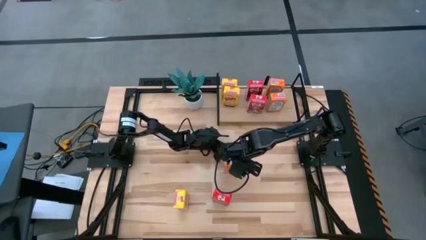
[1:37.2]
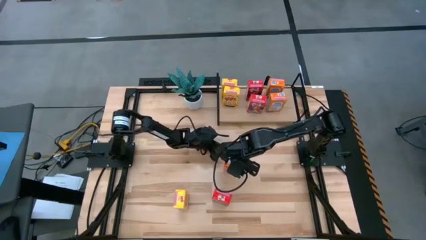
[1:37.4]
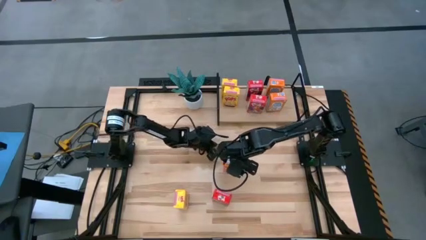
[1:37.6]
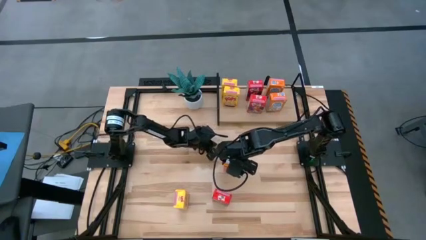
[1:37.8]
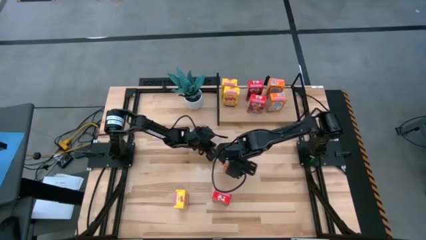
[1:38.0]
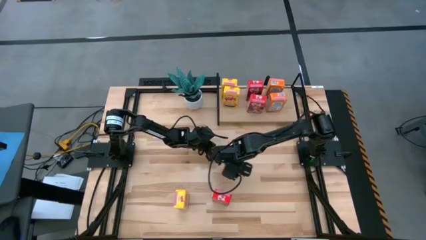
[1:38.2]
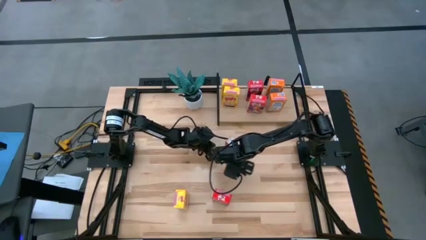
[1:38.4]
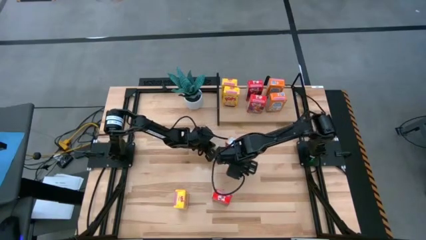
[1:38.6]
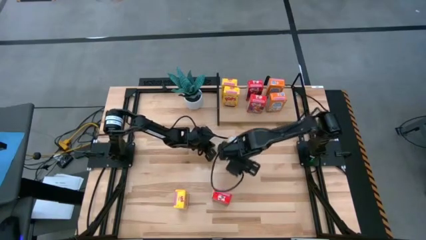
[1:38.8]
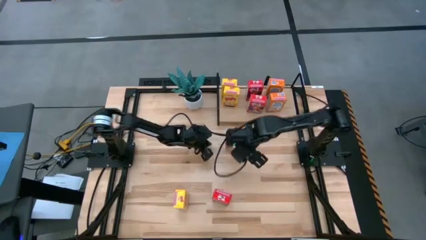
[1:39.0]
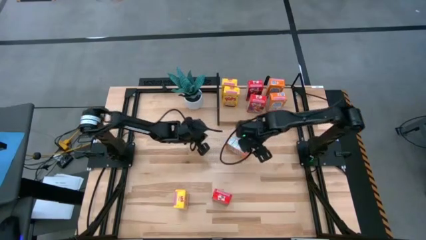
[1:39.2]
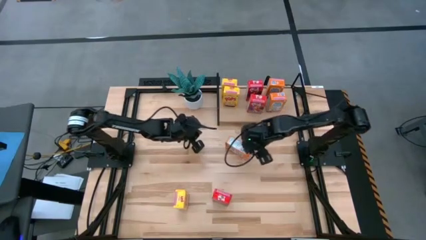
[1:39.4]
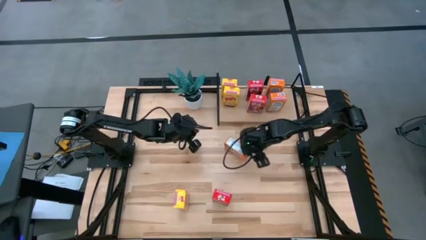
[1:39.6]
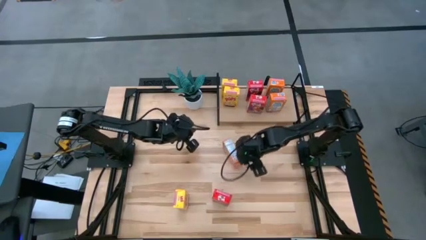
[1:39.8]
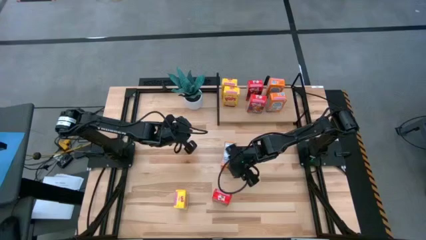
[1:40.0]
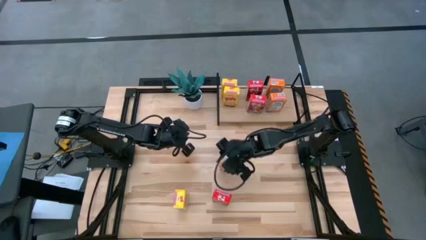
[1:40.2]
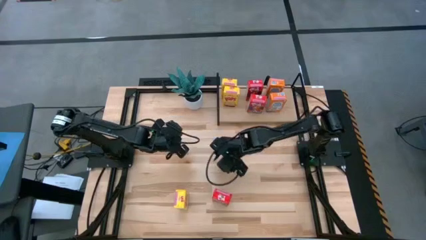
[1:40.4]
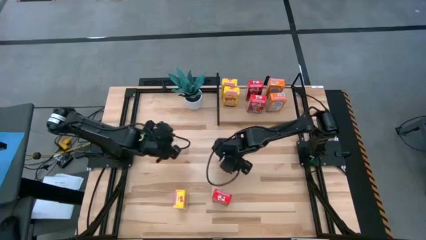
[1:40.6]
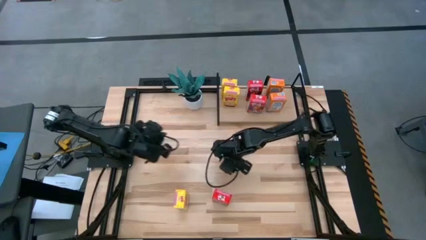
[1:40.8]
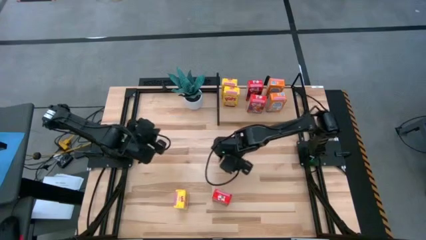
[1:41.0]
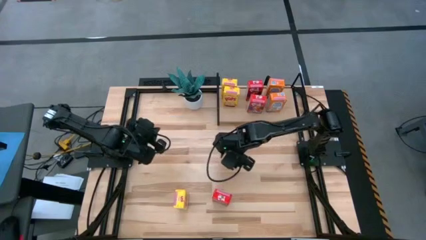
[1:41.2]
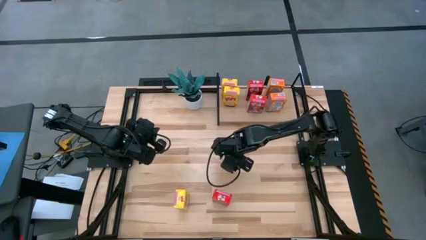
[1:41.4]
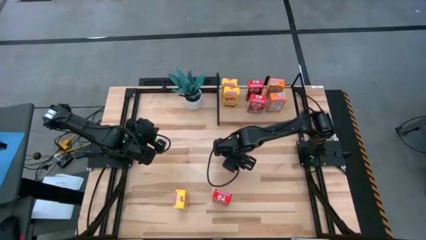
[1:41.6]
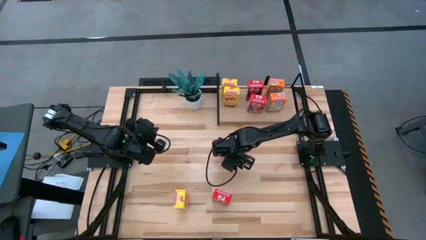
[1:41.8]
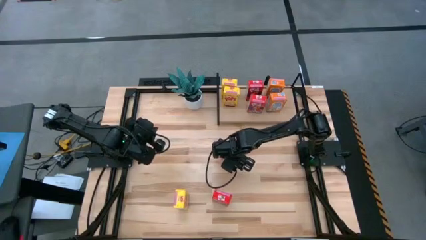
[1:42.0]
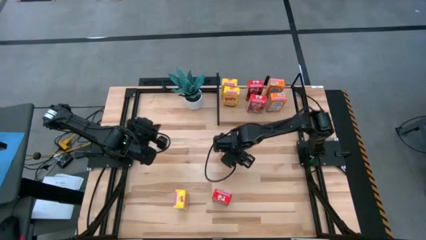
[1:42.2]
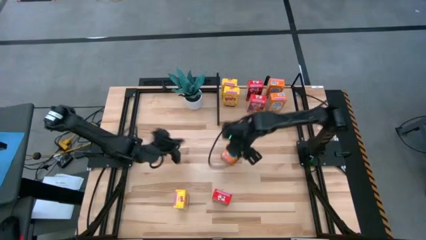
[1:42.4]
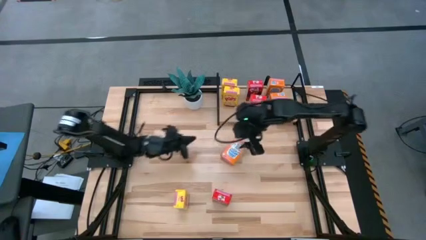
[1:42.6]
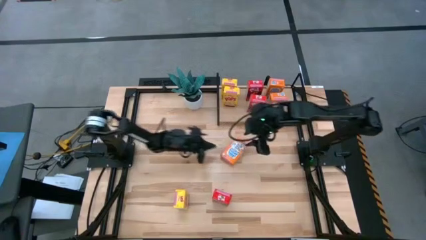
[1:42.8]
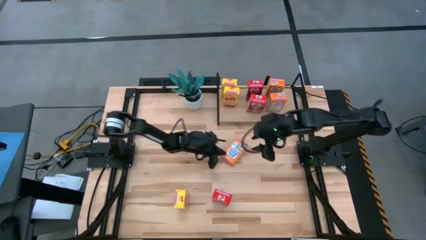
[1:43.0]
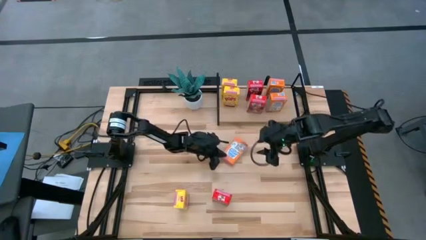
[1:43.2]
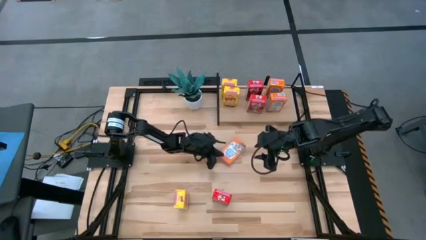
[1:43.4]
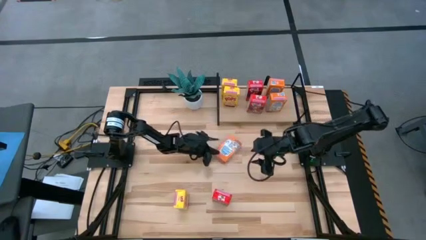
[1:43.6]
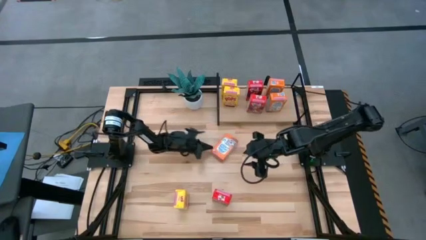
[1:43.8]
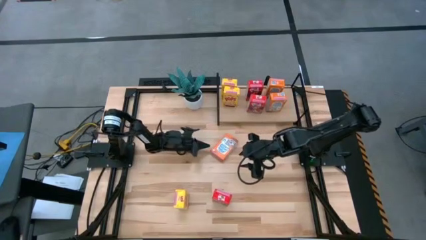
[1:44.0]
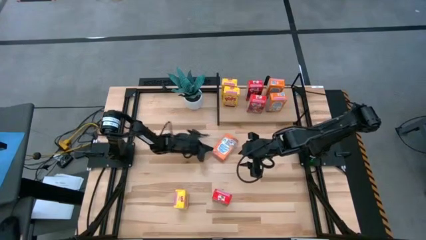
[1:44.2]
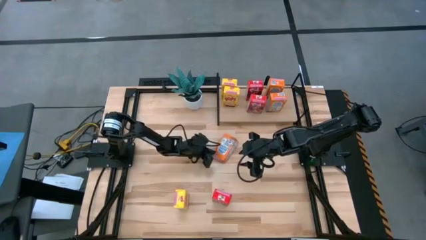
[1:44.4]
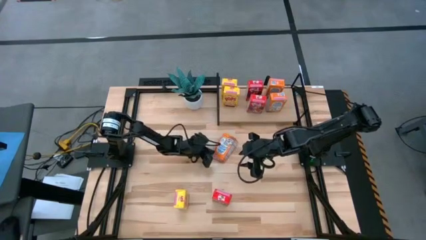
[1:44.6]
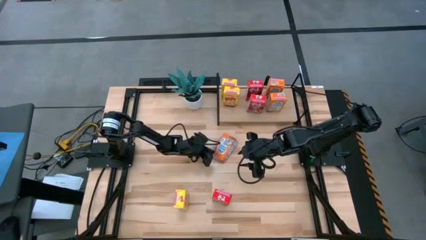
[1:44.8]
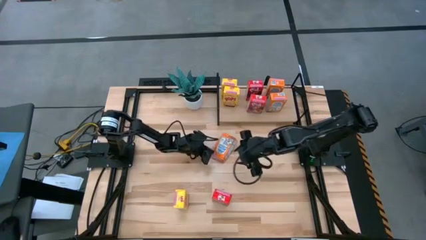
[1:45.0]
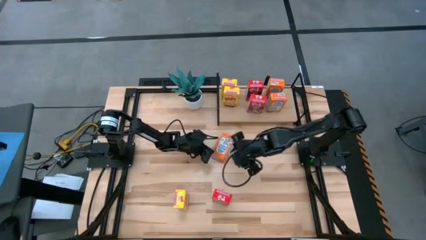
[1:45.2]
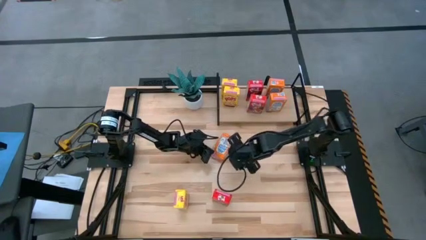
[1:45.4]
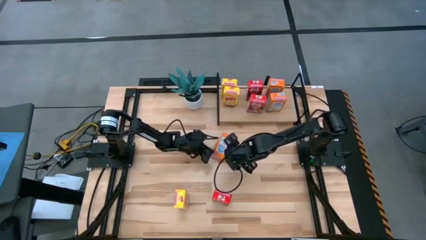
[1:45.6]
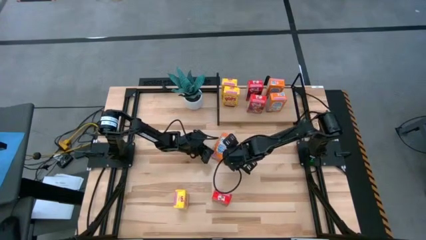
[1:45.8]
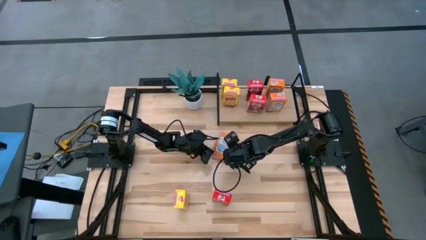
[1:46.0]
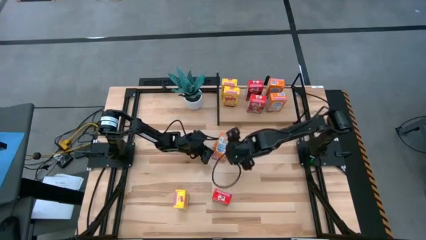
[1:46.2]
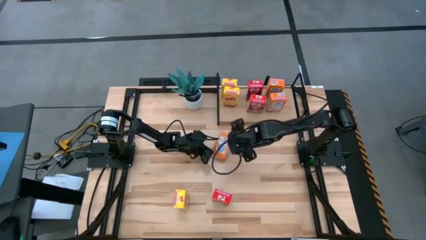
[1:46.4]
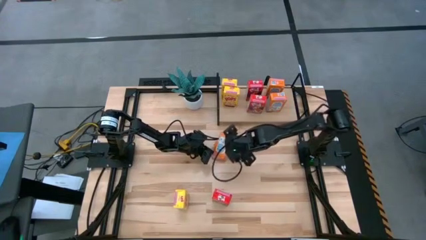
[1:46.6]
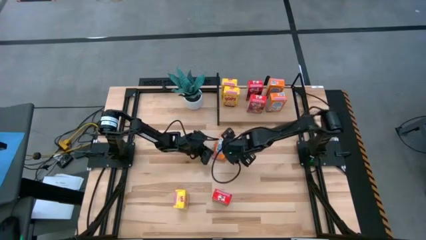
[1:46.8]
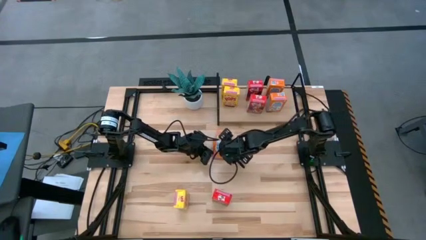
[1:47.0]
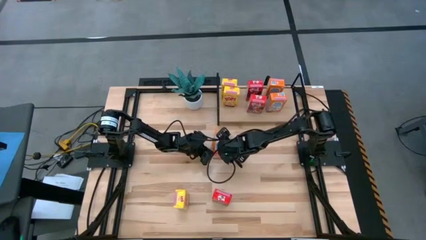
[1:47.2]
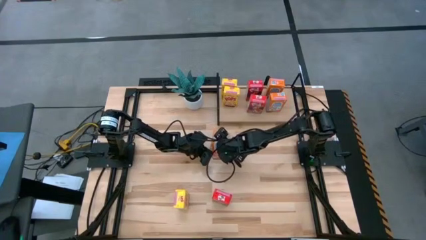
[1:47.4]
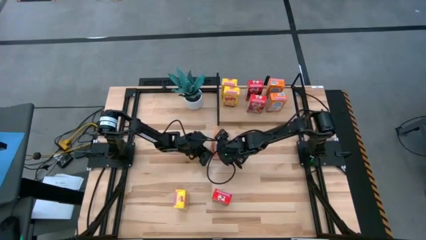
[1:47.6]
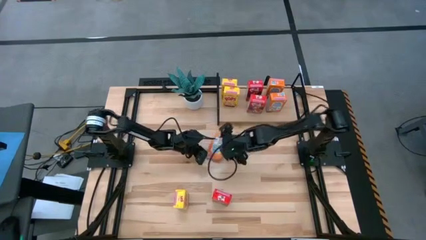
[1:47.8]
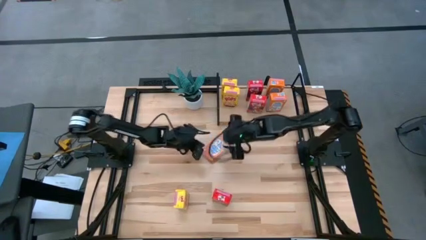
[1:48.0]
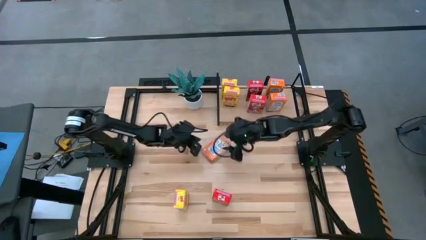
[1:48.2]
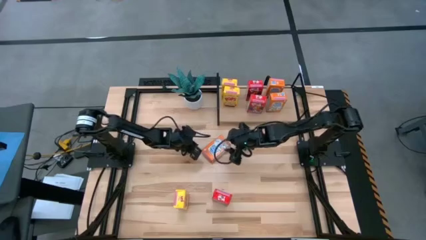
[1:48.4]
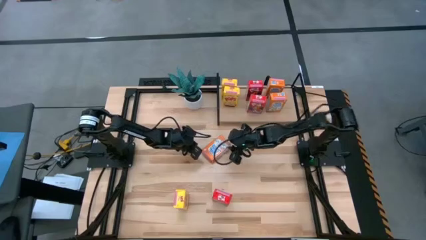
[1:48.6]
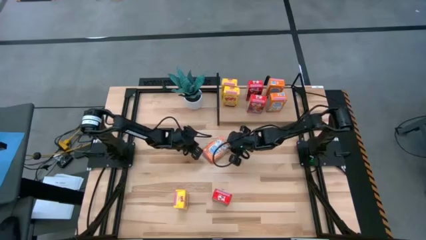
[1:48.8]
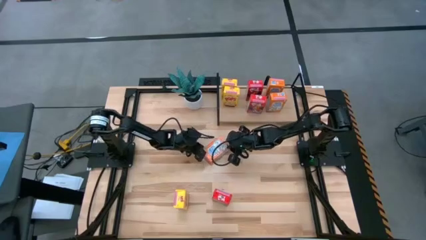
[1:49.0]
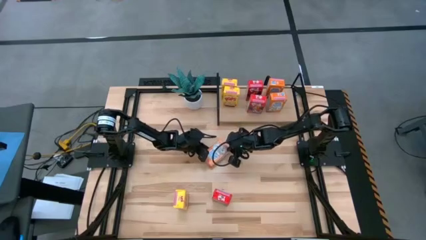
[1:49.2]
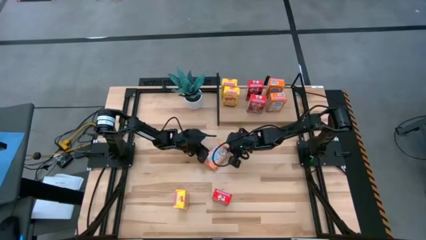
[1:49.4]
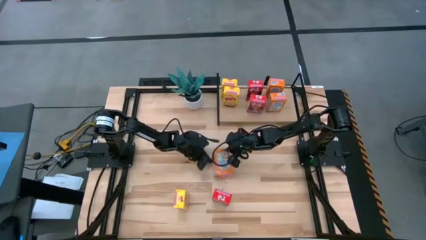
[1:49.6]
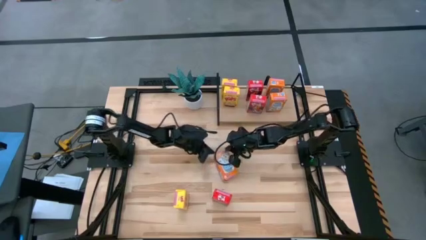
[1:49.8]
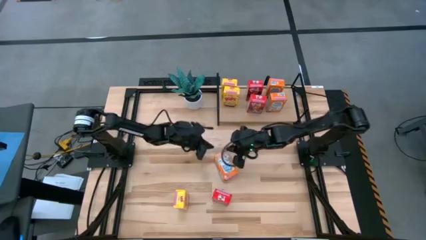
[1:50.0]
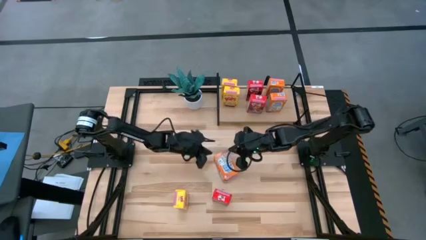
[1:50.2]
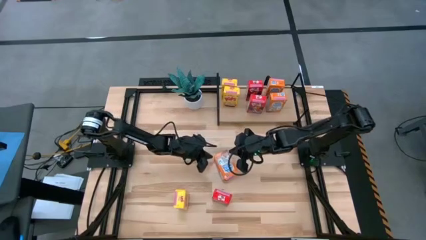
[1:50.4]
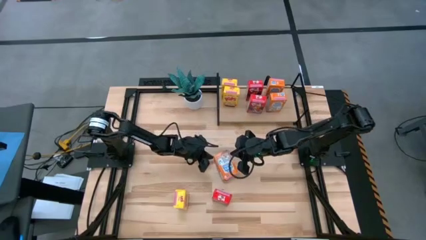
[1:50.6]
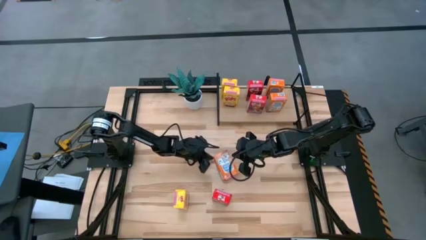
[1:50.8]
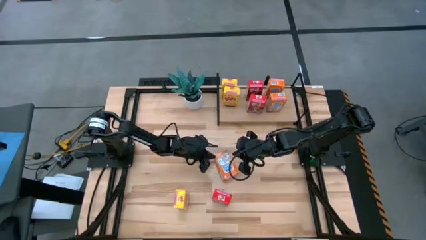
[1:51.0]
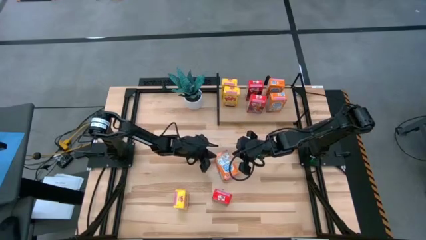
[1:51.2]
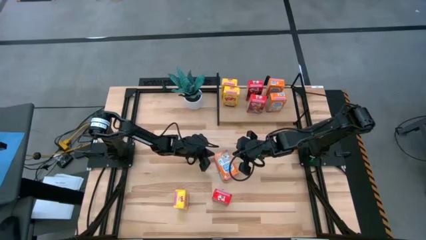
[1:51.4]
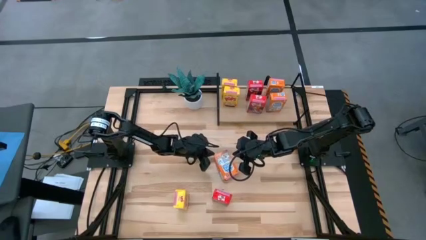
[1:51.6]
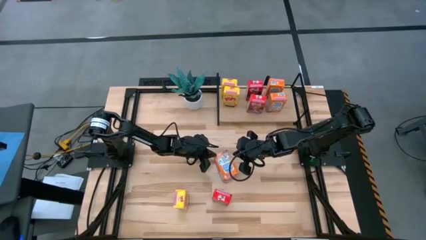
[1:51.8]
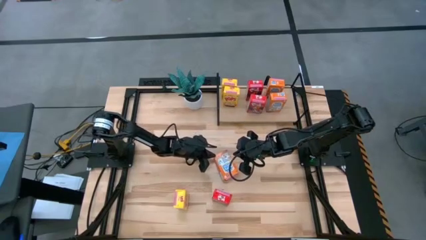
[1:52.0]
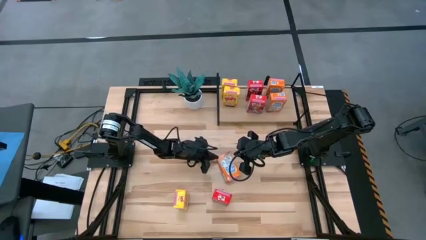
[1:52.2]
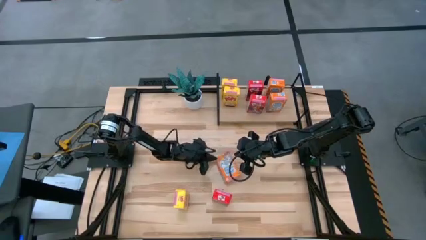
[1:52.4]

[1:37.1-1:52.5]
Task: Stack cereal on shelf
Put the orange cereal box on the shelf aligned with orange cereal boxes

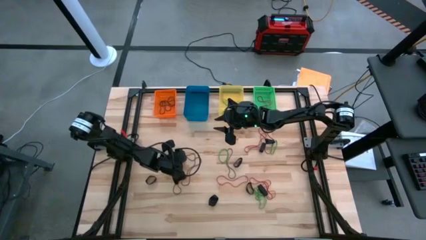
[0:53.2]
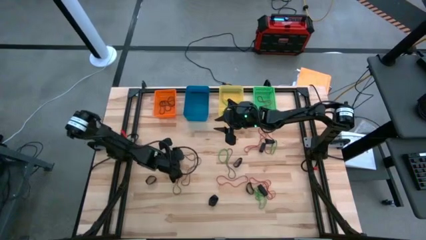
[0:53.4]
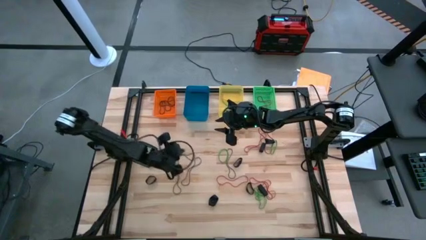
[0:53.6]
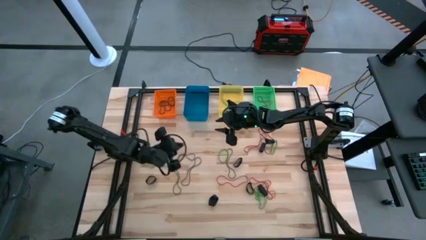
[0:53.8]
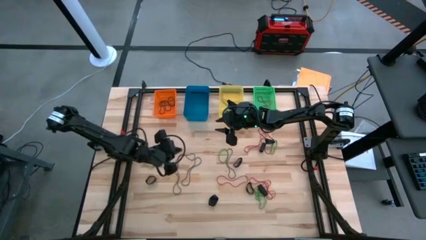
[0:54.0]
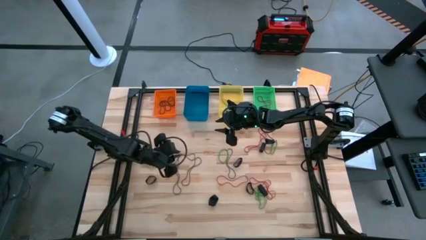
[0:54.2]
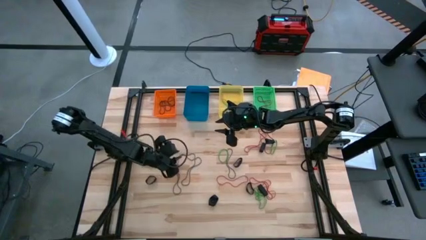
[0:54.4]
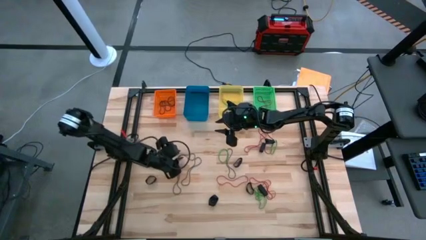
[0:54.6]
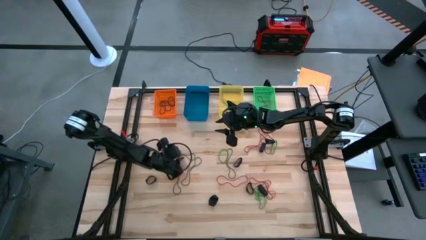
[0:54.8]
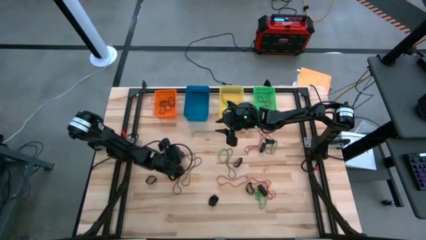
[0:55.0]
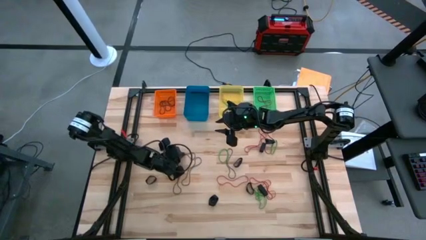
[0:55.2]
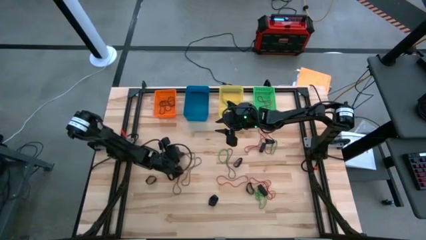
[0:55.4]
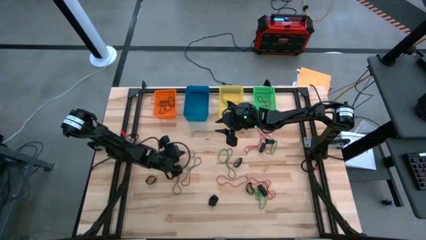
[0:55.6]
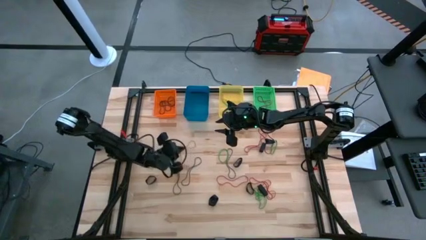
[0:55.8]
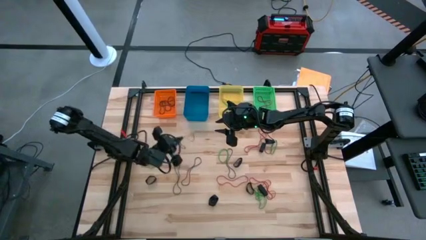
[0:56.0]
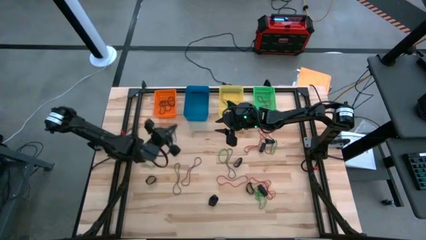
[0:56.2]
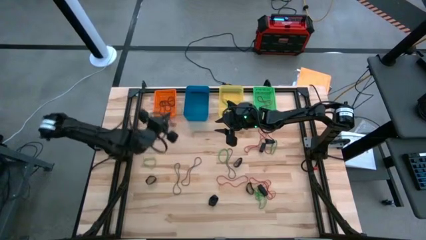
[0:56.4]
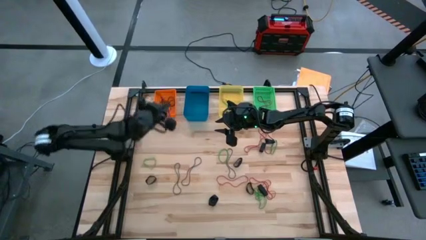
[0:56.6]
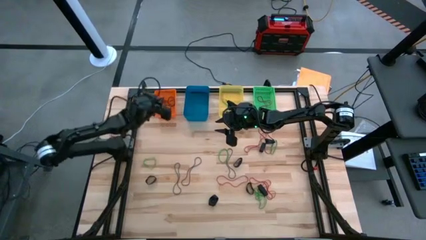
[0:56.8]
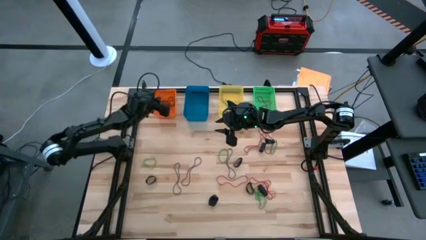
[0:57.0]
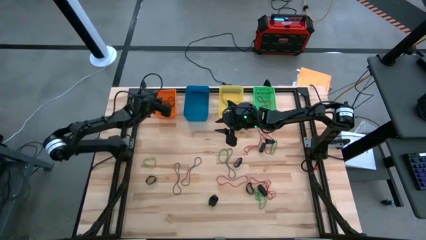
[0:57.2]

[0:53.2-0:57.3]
Task: Sort rubber bands into baskets
Put the violet rubber band into the orange bin
